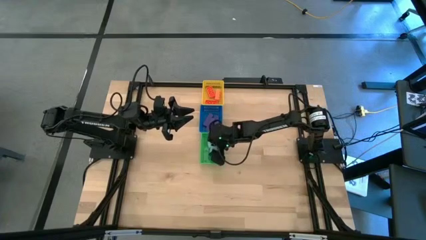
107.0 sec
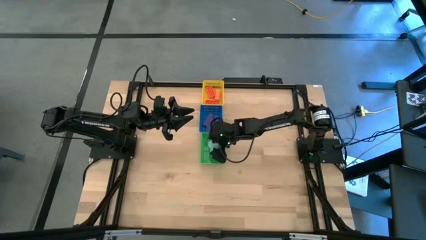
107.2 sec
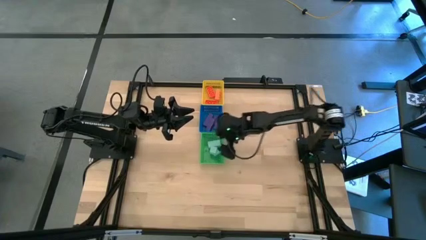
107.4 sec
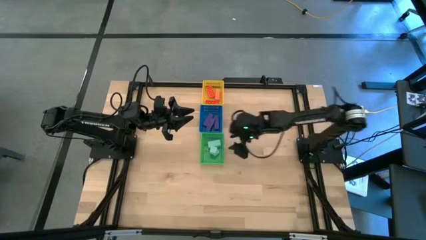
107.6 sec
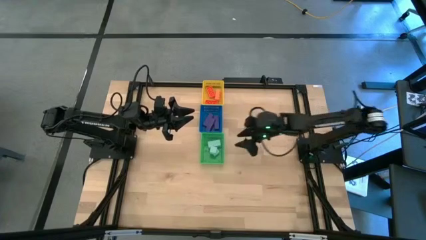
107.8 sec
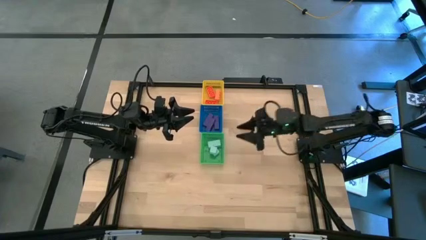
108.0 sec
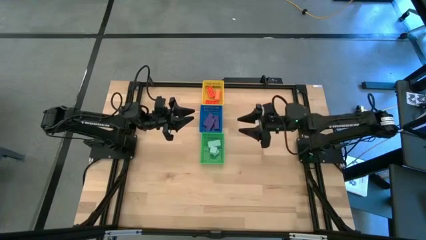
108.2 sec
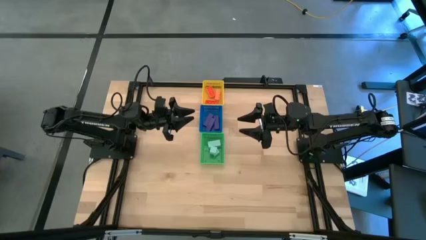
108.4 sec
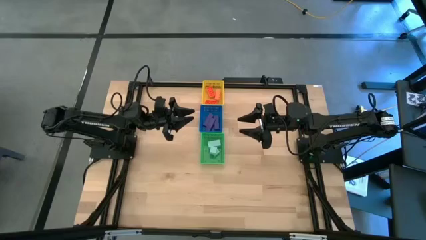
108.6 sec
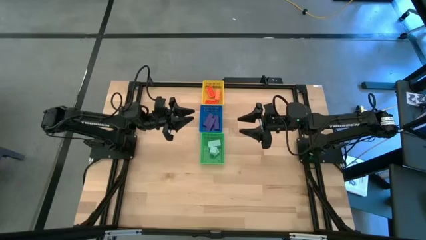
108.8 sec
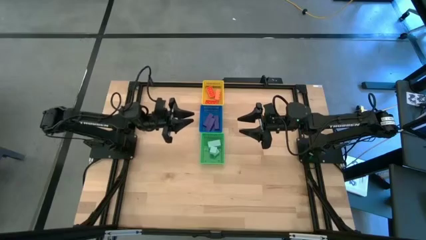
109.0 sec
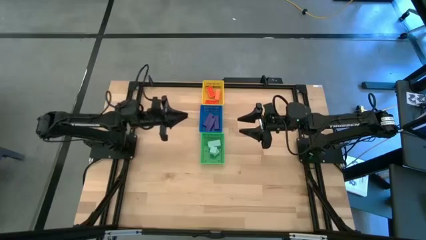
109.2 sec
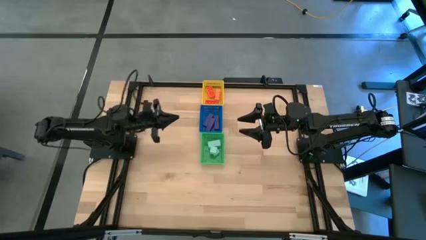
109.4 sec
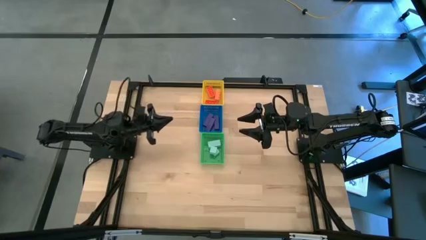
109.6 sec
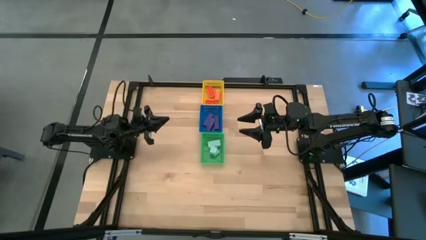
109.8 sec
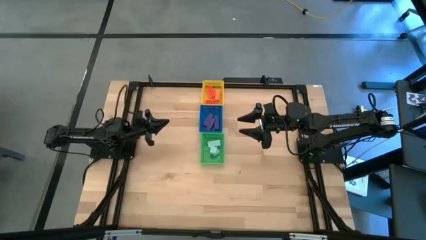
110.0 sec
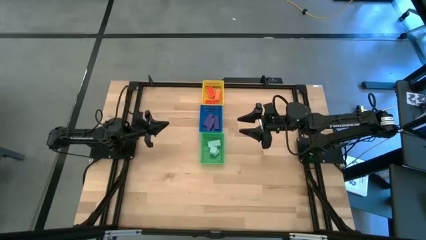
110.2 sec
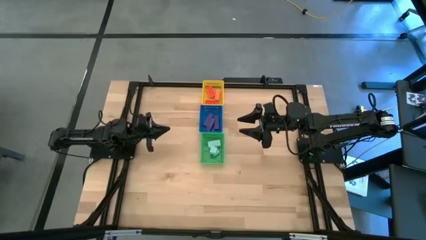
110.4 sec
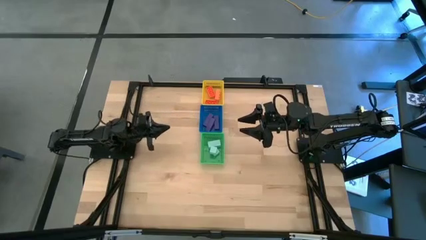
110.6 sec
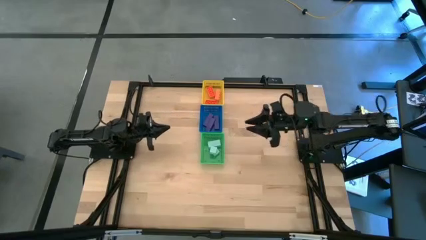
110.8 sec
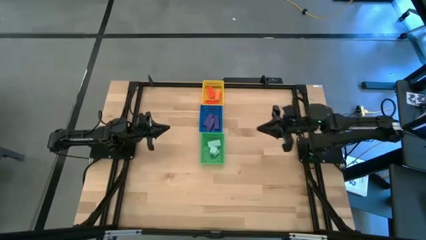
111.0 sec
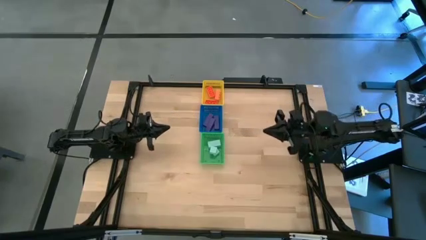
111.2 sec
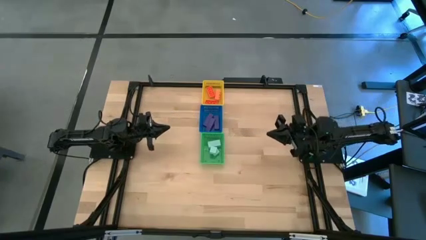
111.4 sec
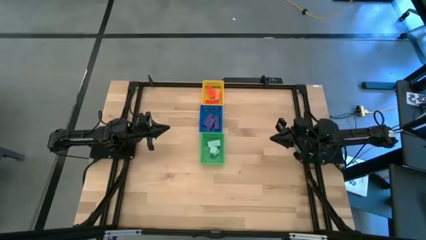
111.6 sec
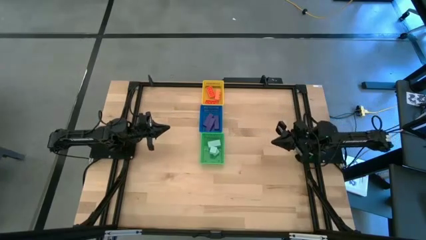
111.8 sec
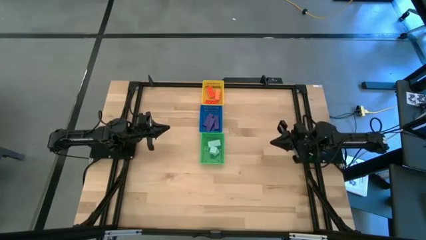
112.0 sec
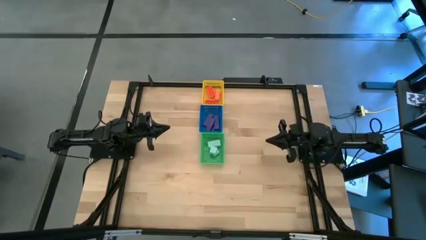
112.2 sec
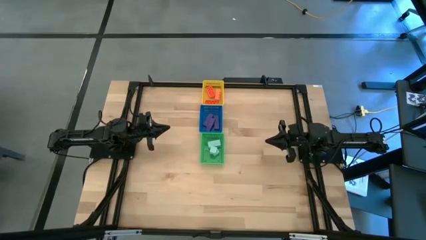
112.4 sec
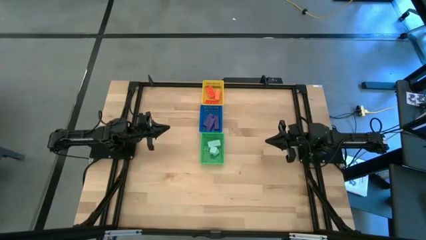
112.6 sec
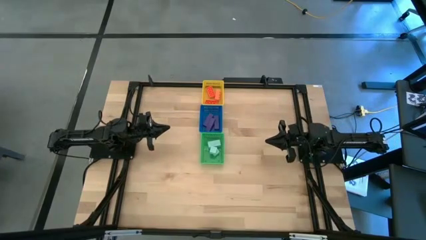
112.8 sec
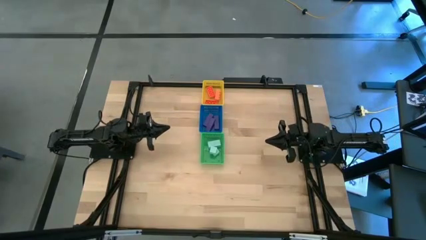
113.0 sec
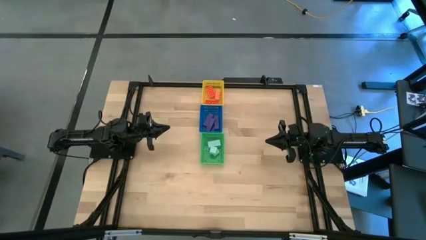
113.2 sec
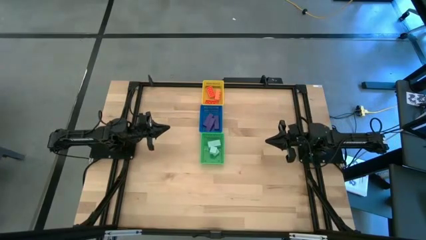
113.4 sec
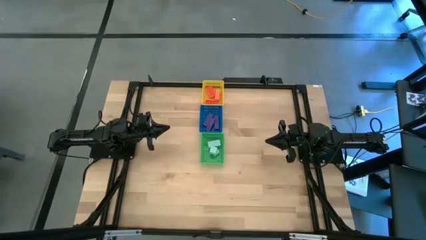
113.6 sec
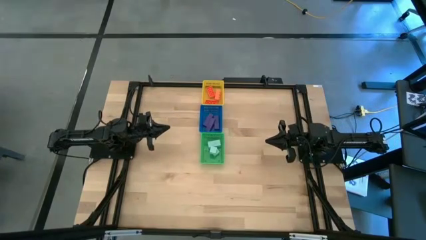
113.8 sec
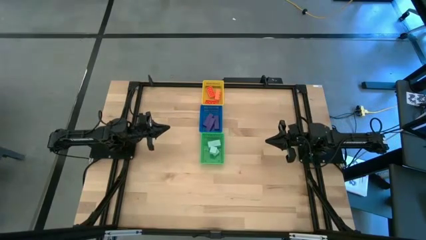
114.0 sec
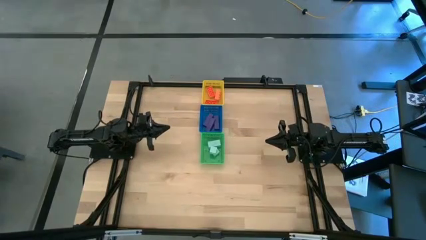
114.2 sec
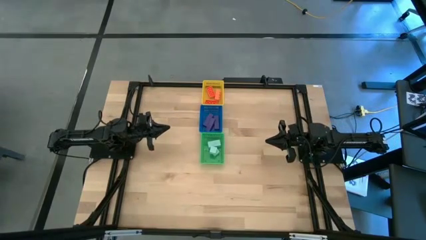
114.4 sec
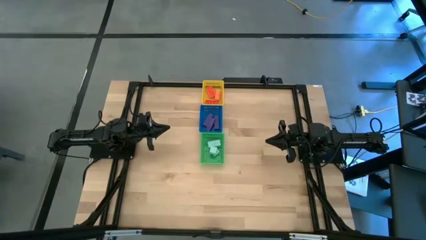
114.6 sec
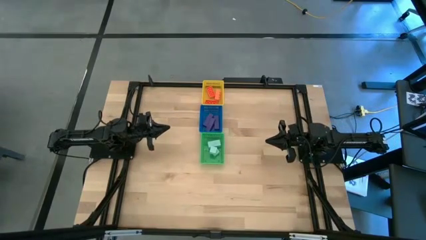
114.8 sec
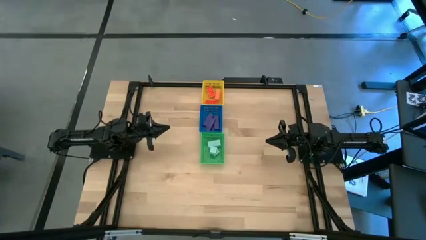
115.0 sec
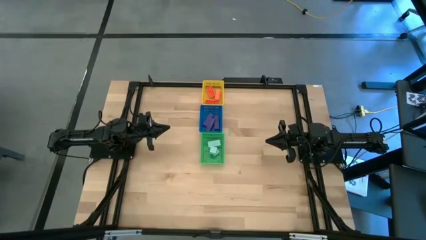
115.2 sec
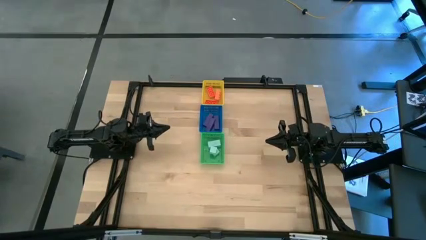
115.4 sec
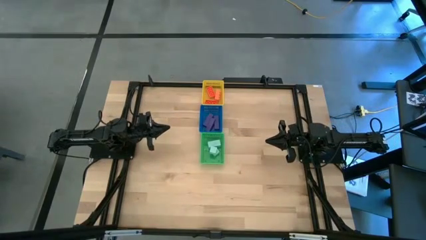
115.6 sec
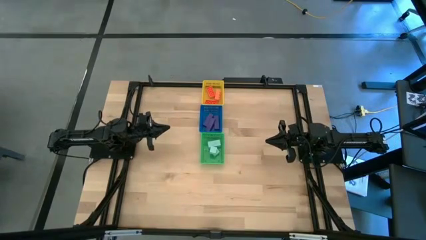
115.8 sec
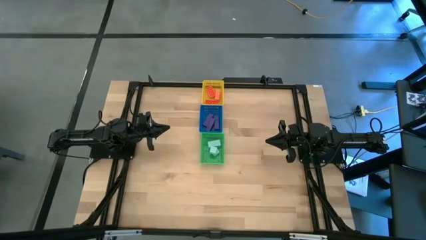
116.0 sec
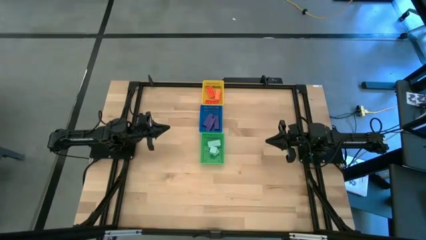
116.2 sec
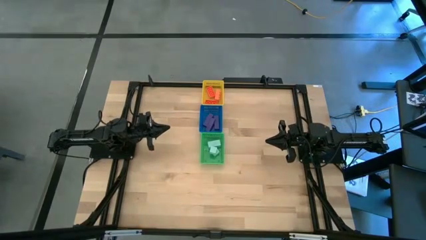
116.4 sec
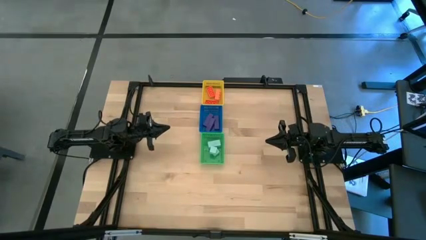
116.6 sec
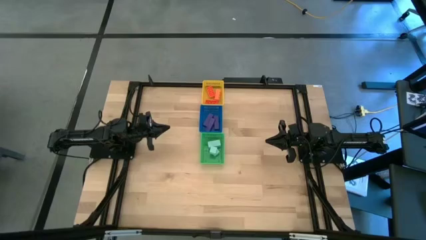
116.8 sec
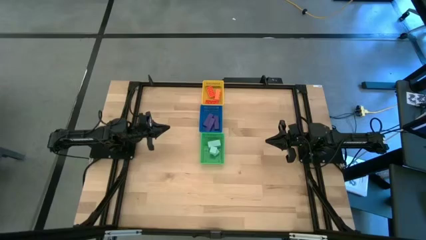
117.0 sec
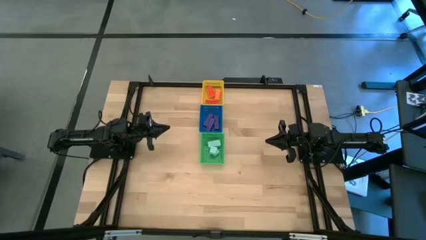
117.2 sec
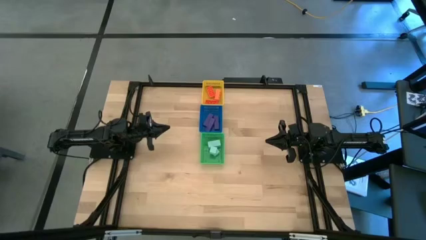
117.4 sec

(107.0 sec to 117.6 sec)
Task: Sort & place blocks by color
Return to Home Position

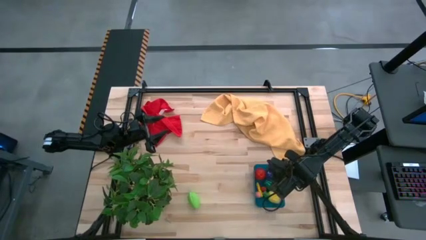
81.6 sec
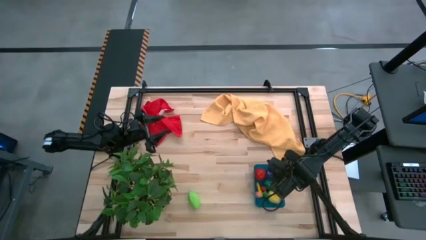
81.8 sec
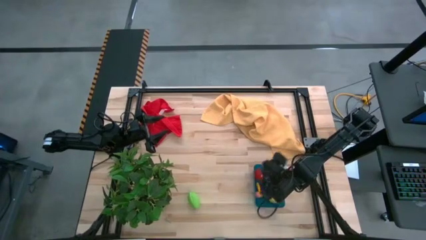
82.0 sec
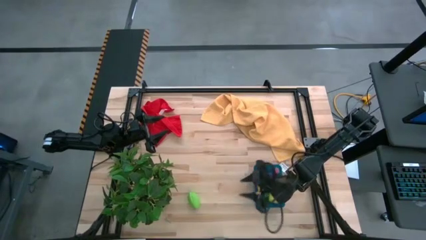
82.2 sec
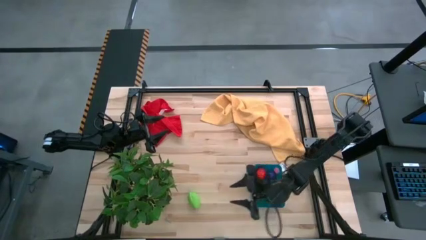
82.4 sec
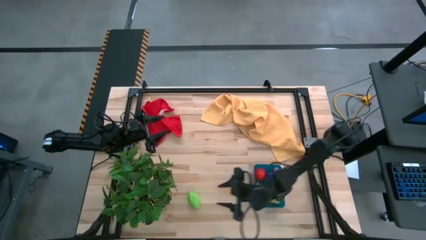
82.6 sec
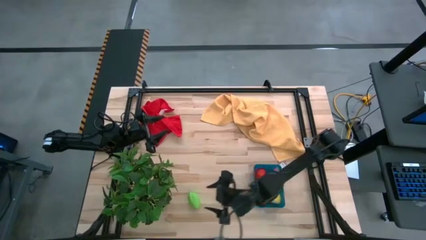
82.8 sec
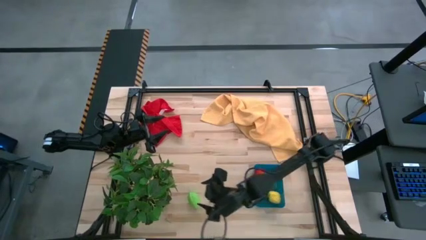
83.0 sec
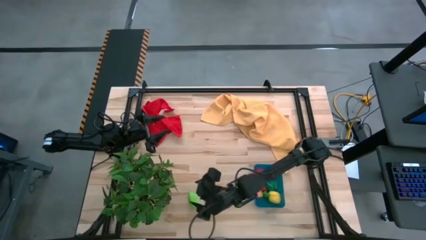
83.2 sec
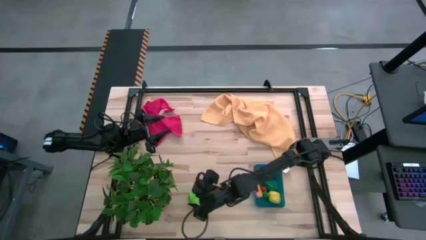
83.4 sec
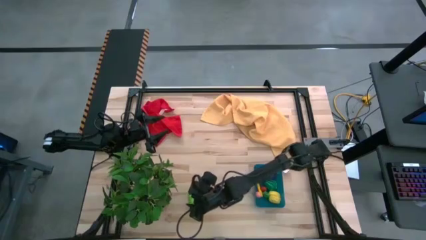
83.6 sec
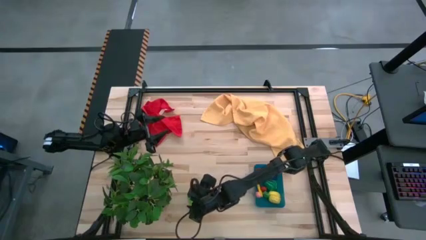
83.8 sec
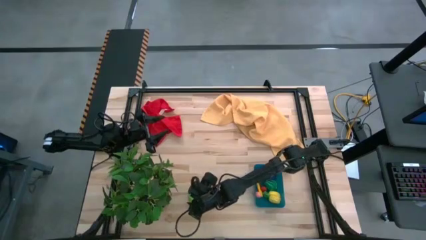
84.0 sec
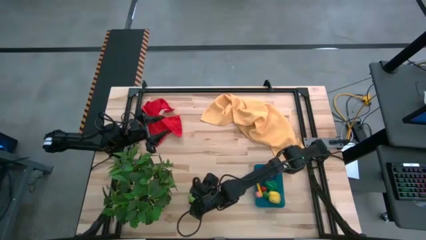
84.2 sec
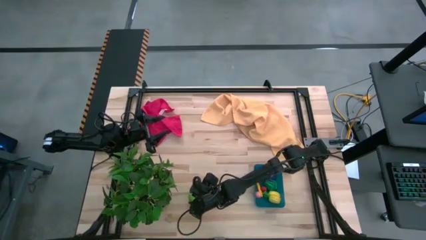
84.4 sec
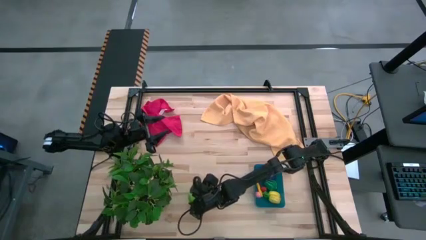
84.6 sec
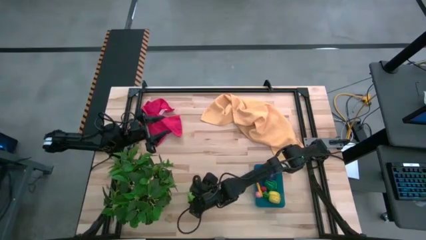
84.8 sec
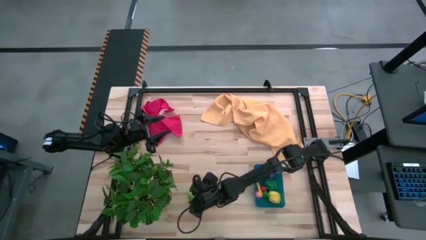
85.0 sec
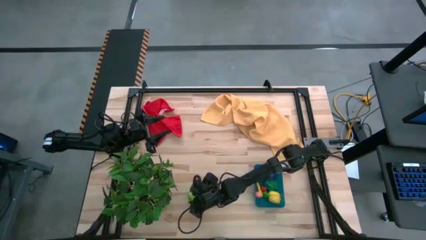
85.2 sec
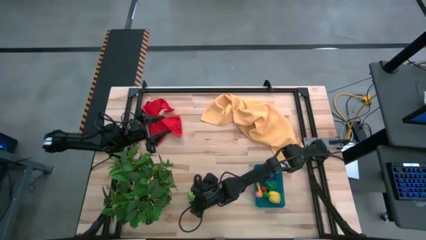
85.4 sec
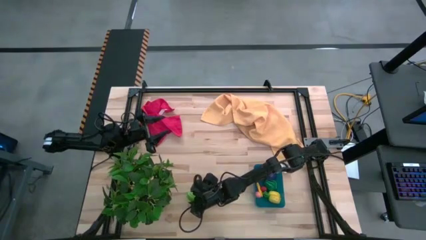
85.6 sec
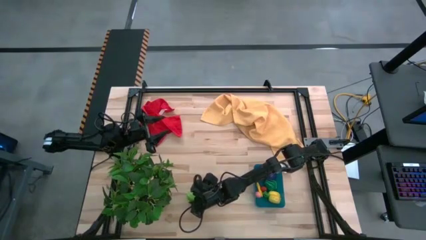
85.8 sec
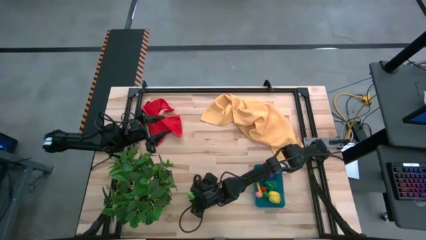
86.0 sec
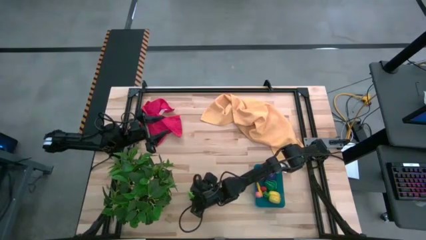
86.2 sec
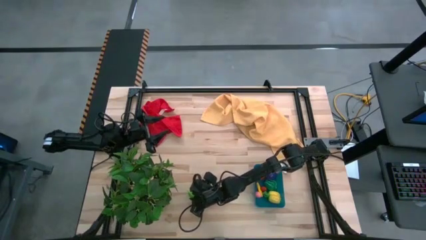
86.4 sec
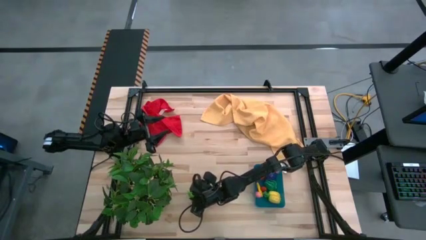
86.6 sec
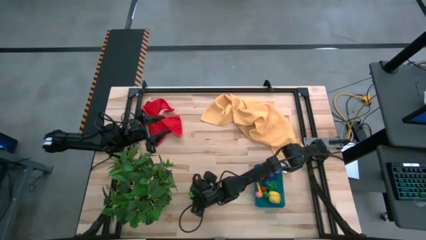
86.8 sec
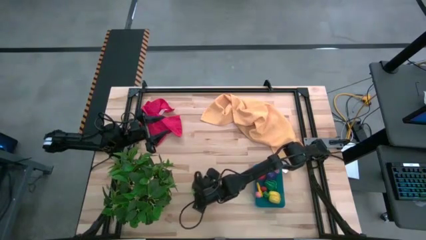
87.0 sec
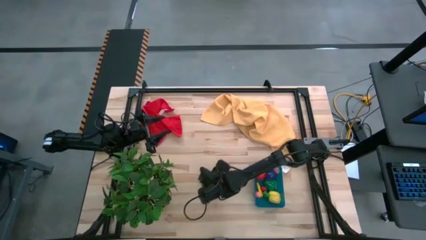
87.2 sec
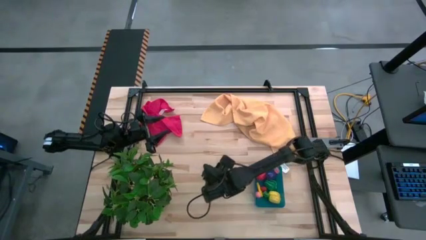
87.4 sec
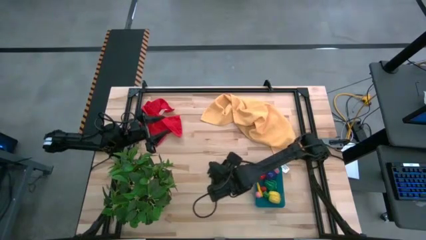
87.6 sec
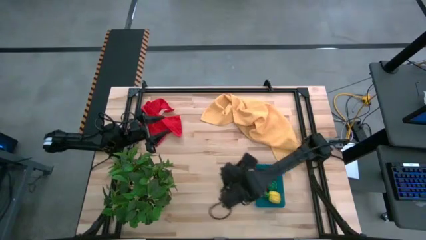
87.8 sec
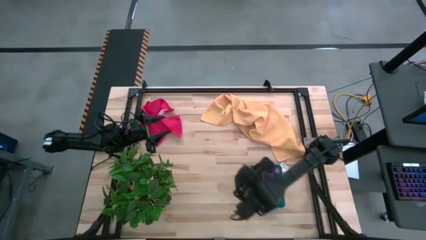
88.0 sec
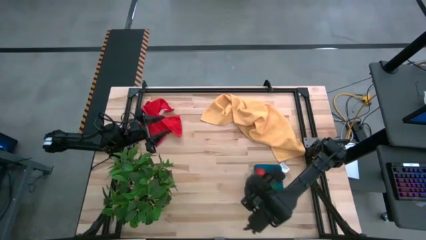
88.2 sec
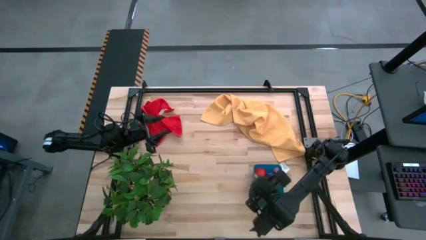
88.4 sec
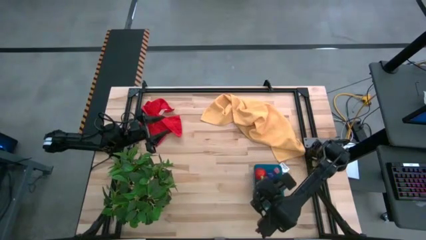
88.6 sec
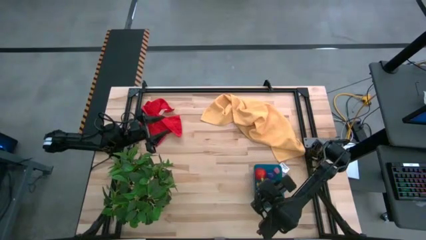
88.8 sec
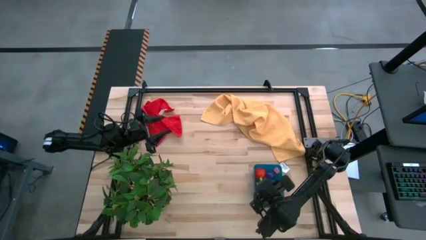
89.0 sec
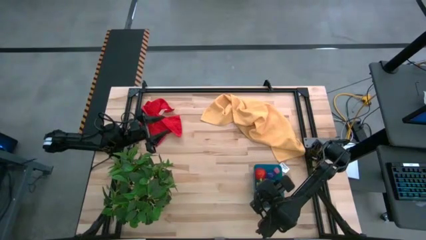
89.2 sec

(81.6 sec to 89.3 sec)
Task: Pick and placing Produce into tupperware
Put the green melon into the blue bin
